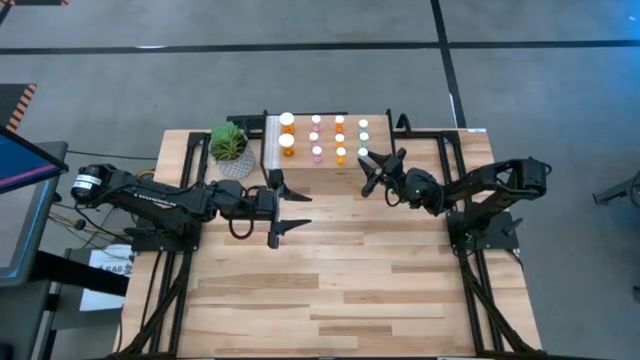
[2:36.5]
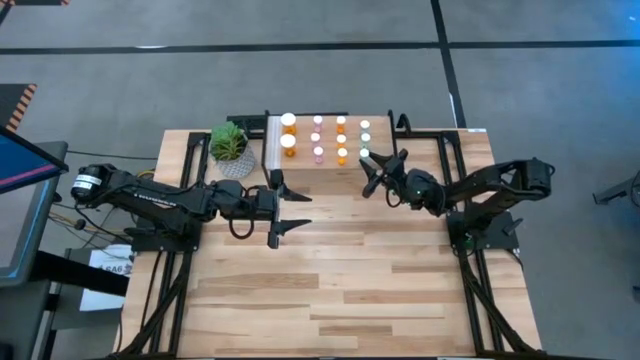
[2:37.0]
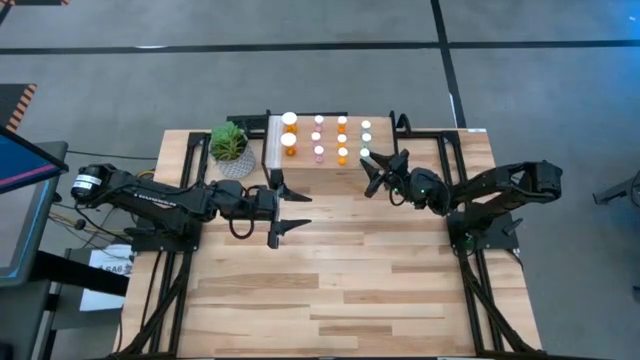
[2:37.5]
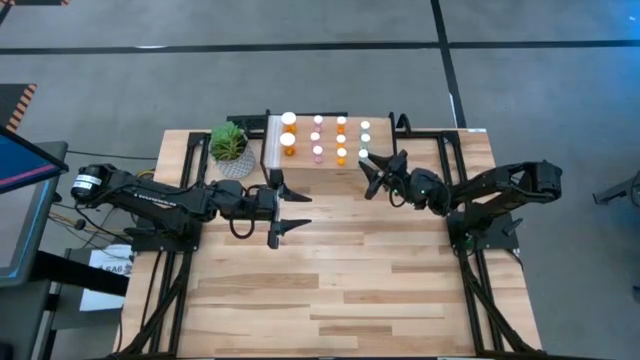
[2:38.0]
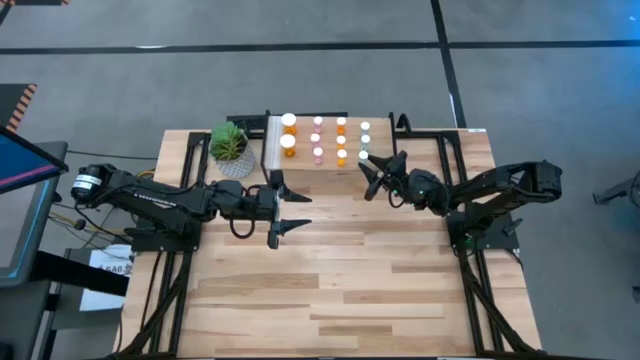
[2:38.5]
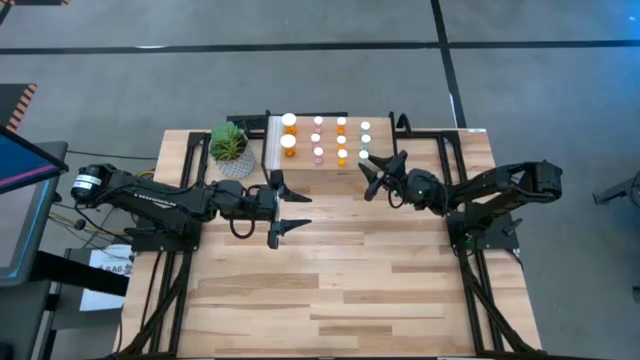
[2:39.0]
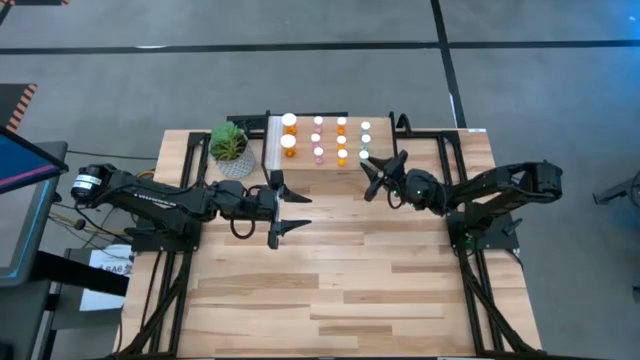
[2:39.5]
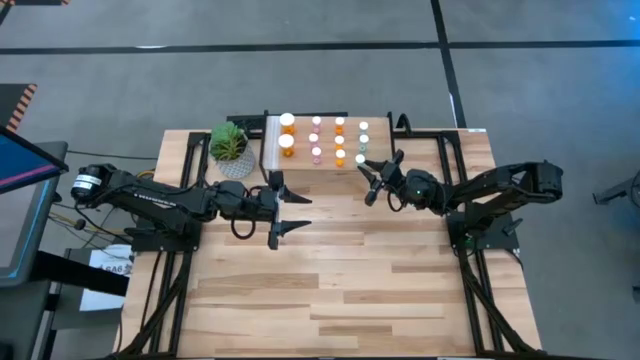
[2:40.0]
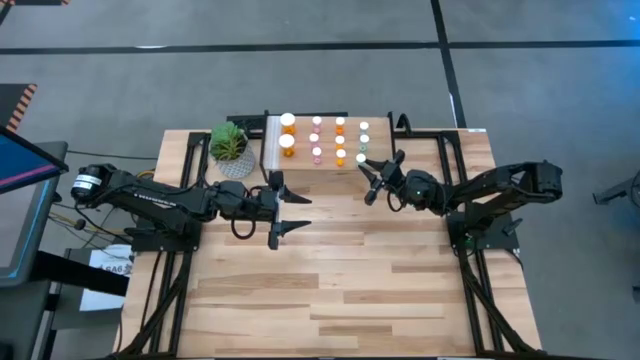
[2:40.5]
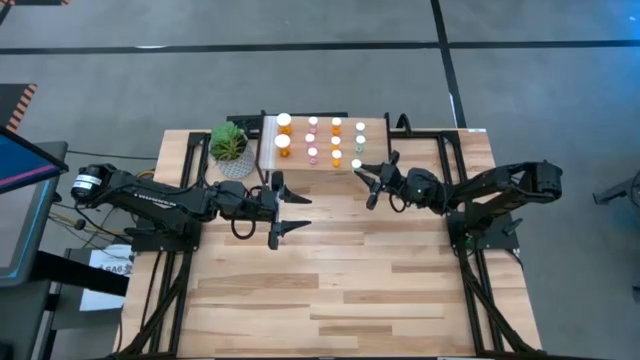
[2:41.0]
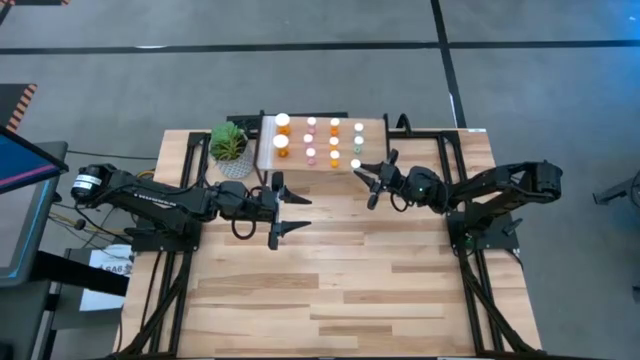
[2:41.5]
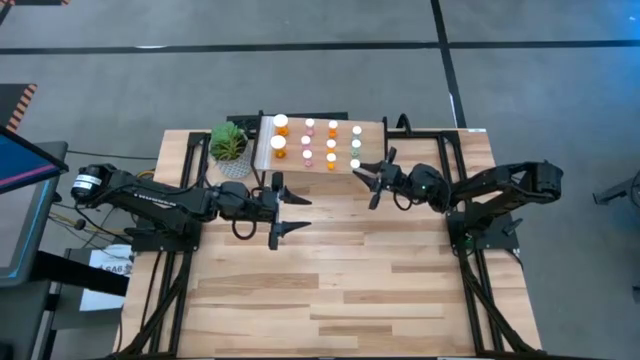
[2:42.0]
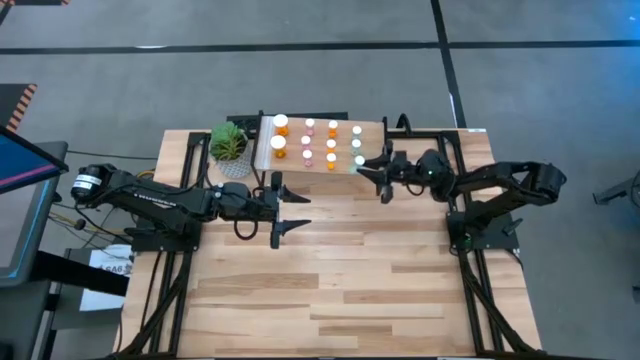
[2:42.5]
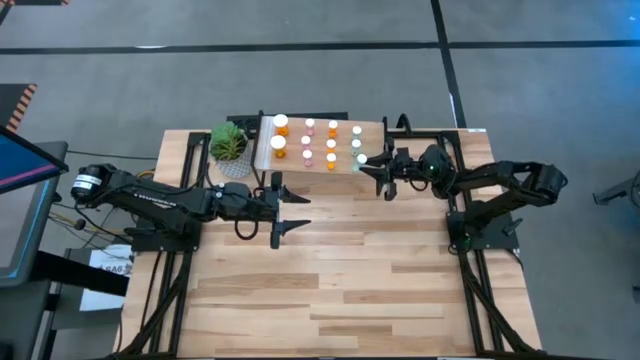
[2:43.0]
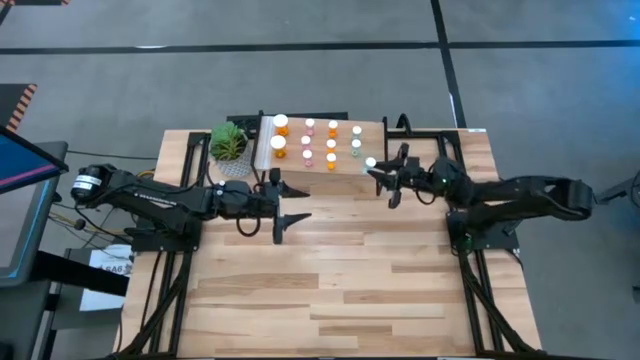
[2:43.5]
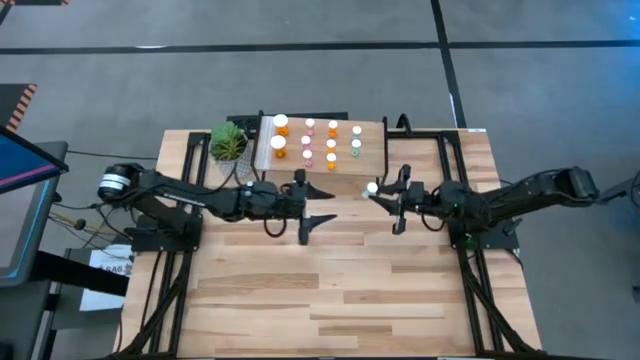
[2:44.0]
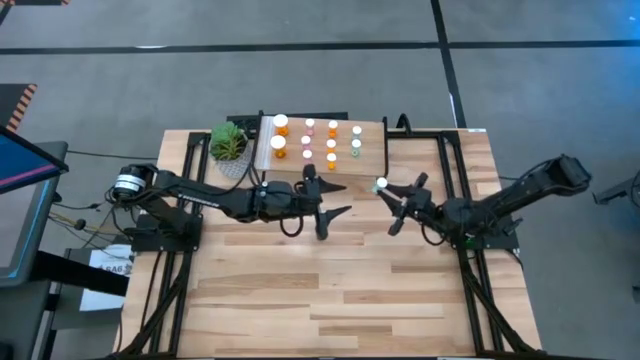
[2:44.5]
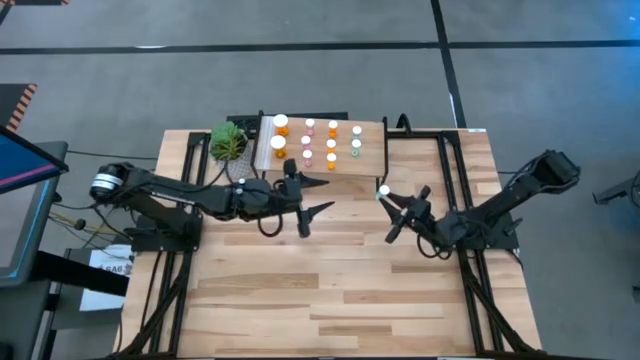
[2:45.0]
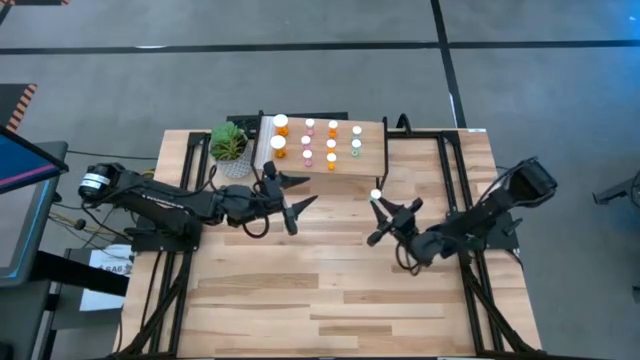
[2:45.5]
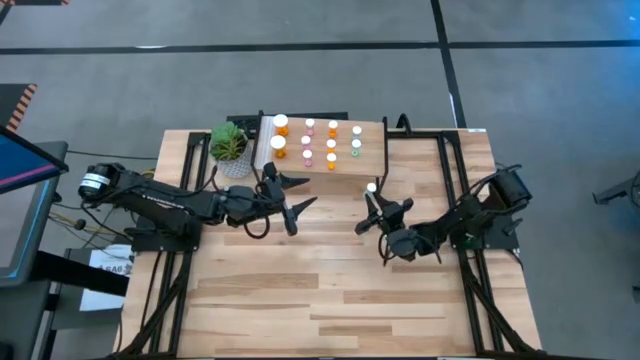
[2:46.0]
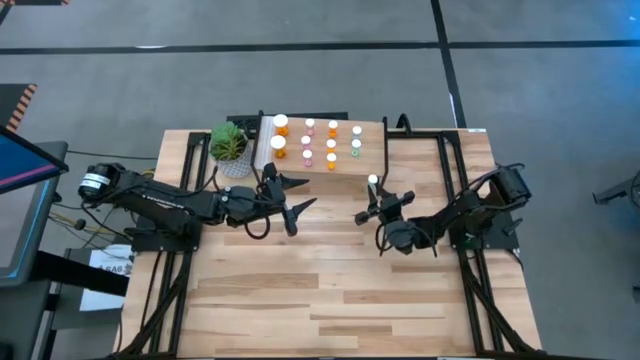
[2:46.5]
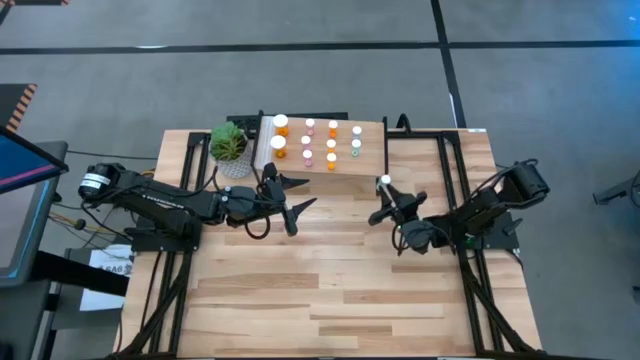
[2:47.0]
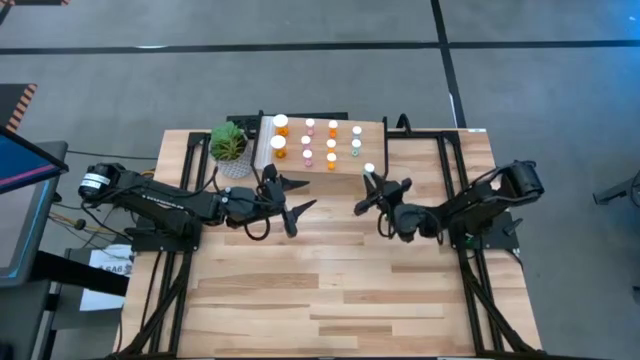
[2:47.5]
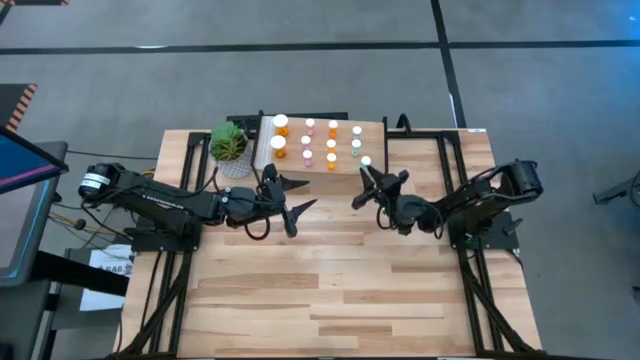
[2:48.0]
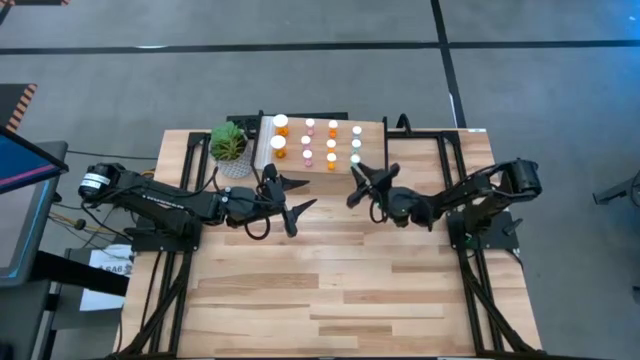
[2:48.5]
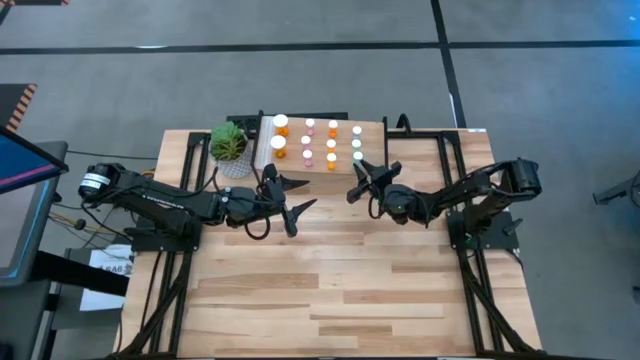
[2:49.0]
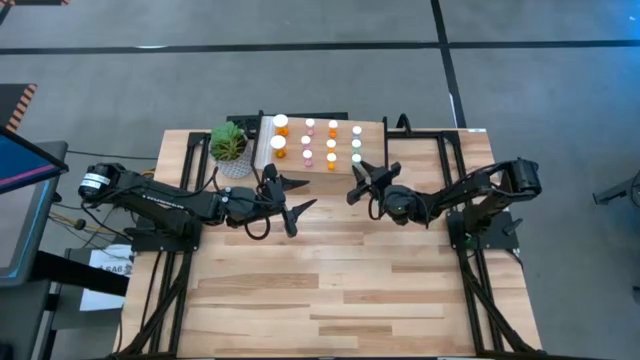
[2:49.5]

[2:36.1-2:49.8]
Task: Pick and place medicine bottles onto shelf by color
Put the blue pill bottle aligned with the other blue pill bottle on the shelf

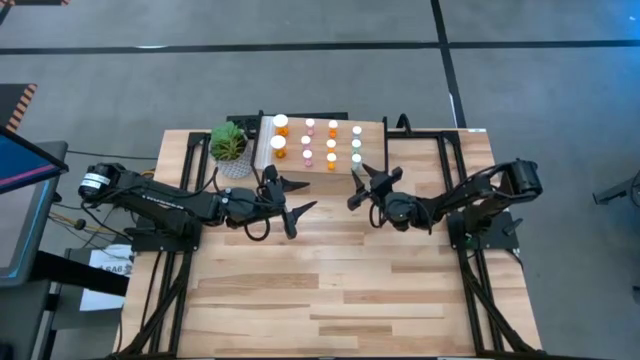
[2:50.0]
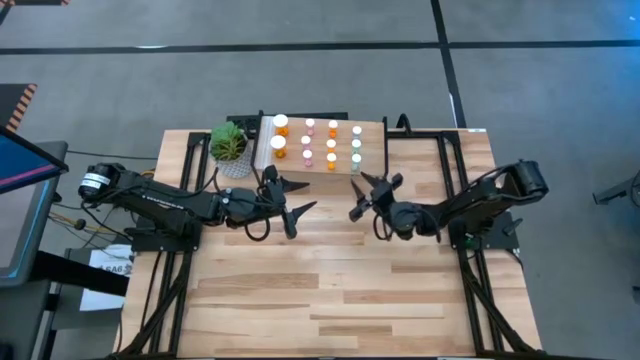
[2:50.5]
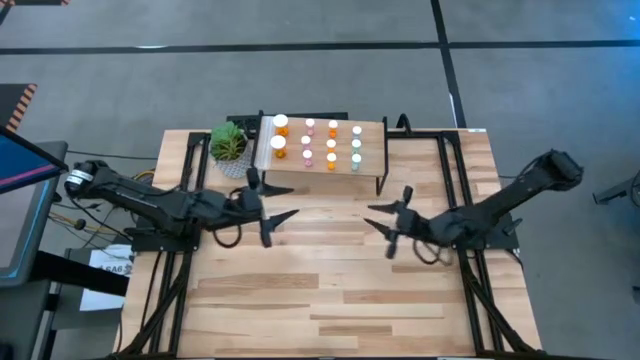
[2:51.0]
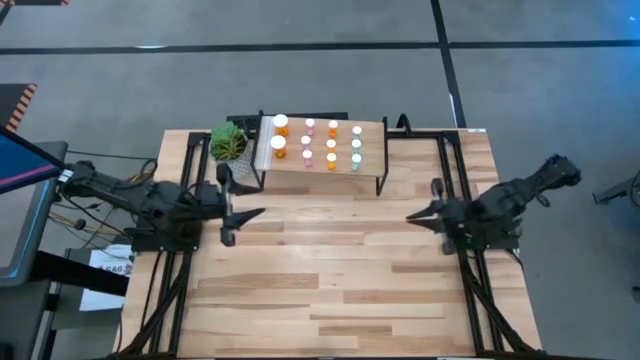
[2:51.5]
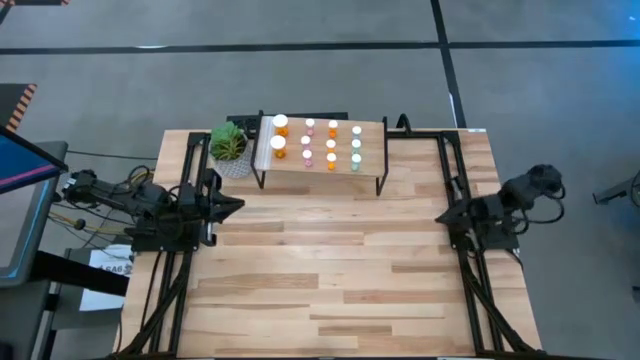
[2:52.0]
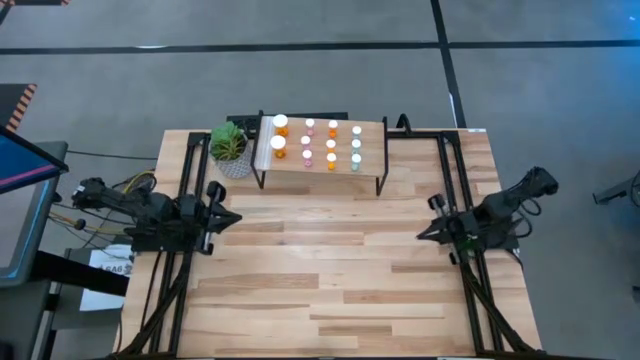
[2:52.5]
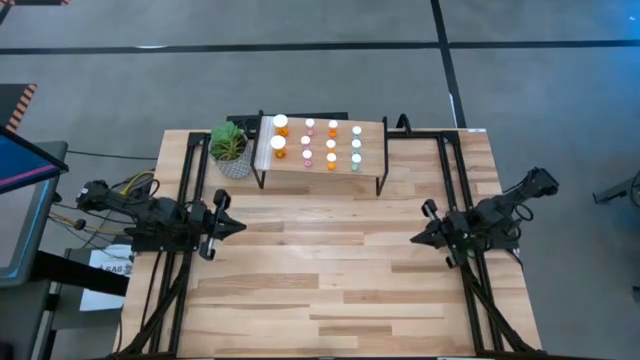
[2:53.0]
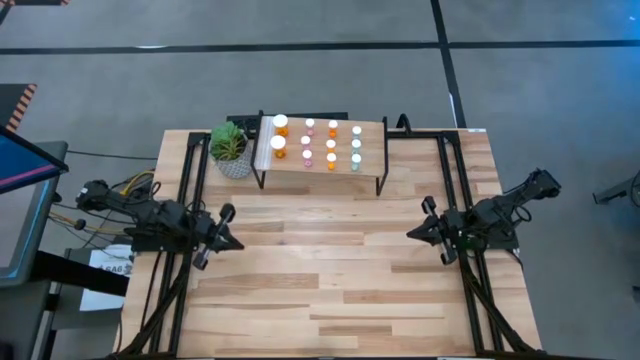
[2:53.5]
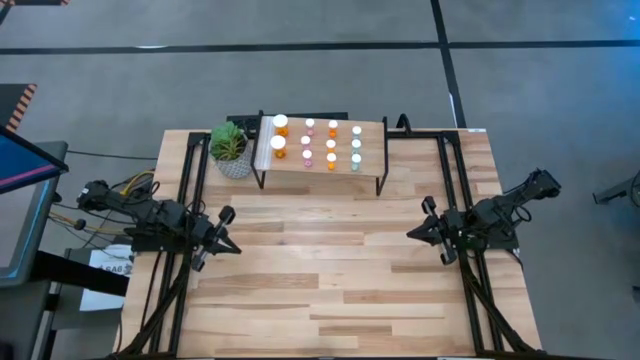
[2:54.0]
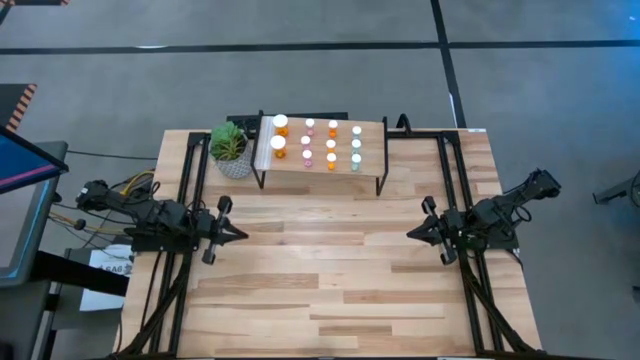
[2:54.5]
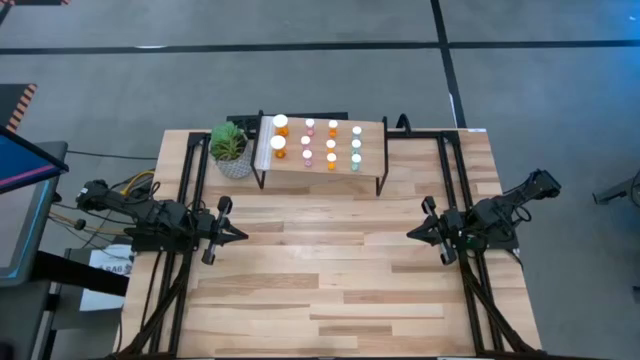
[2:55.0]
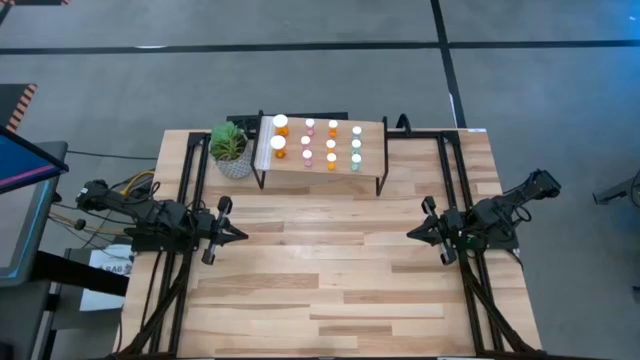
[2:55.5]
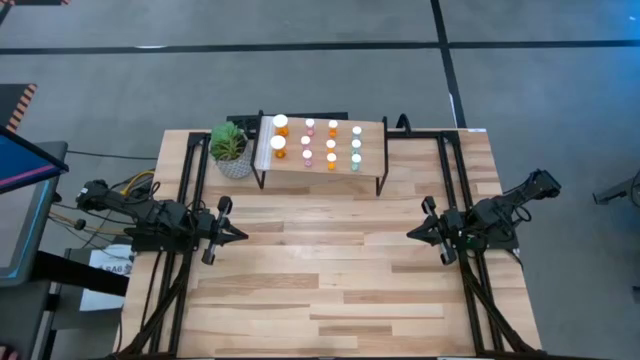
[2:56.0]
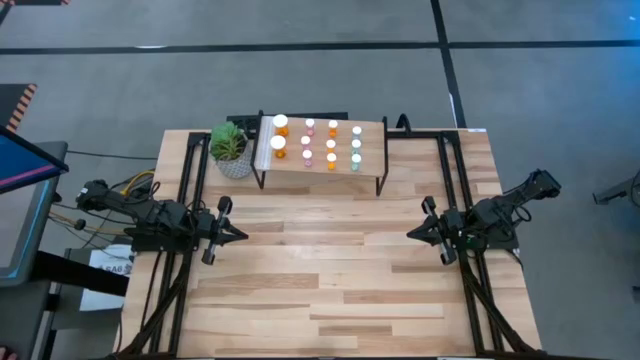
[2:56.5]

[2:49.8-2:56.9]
Return to Home Position
